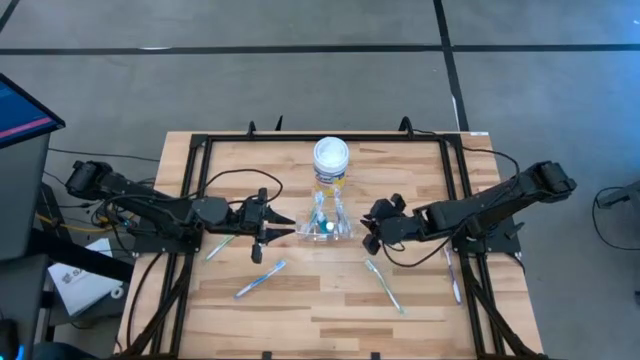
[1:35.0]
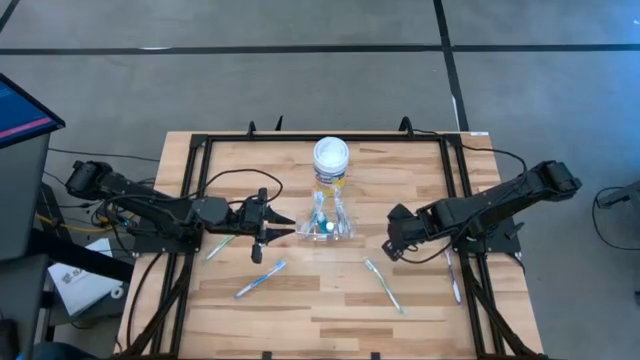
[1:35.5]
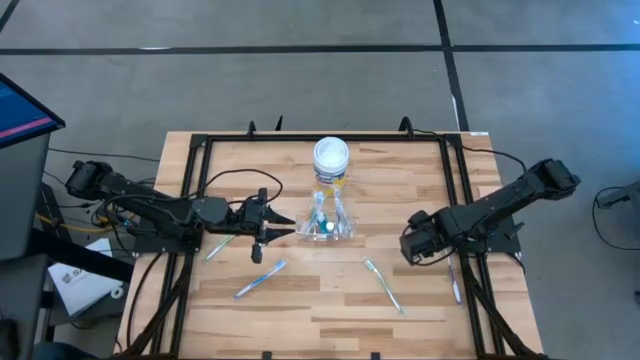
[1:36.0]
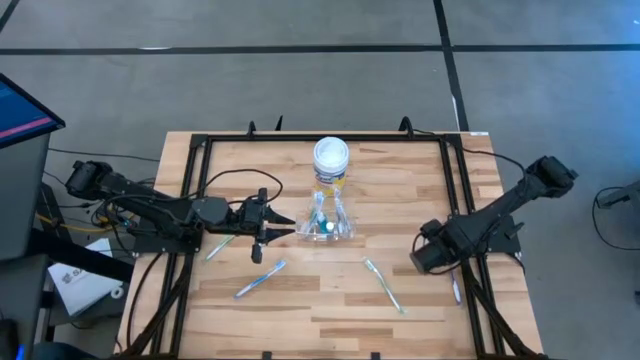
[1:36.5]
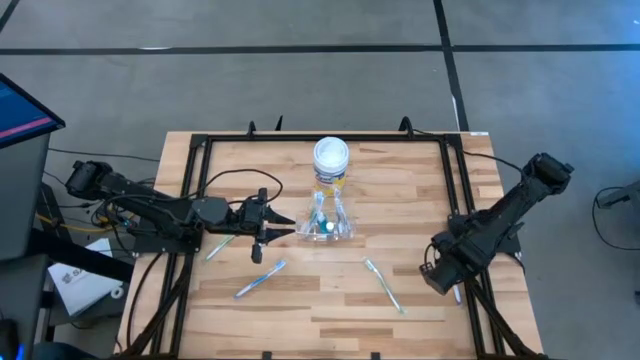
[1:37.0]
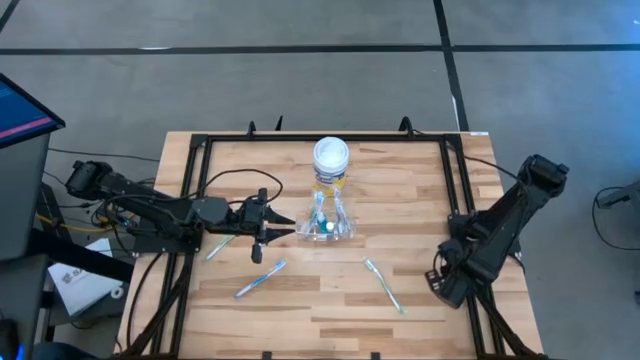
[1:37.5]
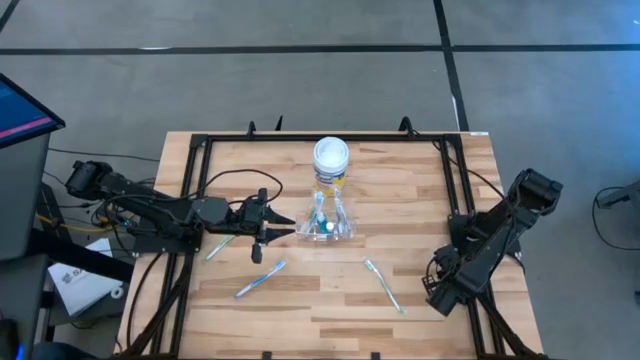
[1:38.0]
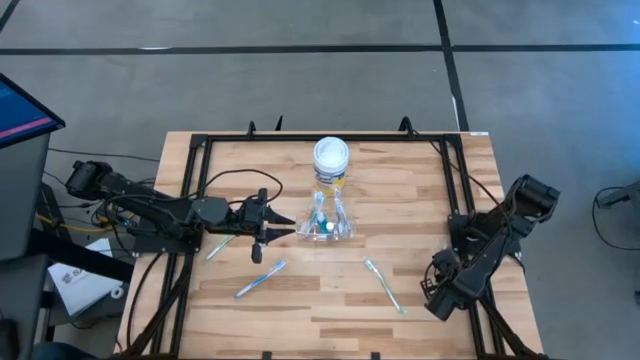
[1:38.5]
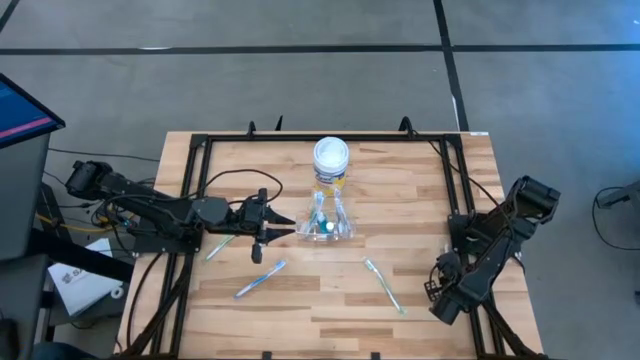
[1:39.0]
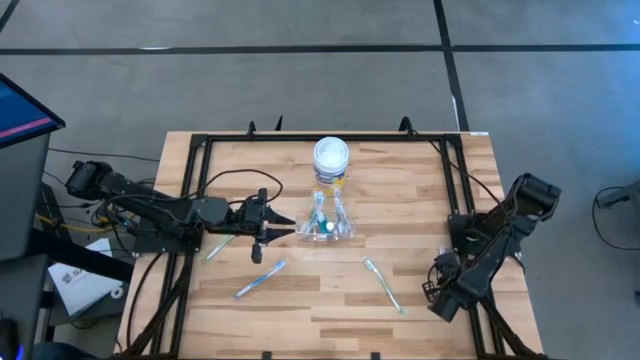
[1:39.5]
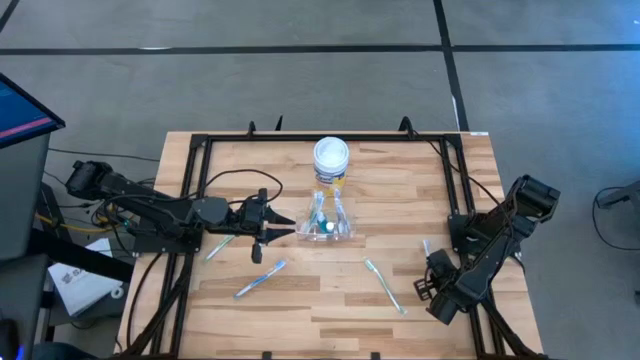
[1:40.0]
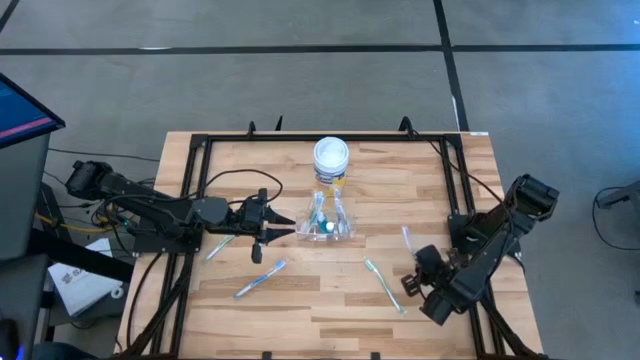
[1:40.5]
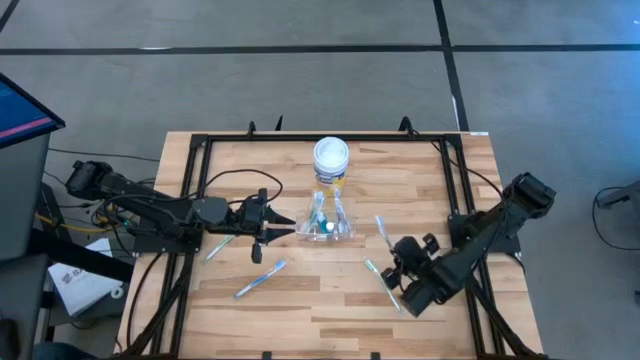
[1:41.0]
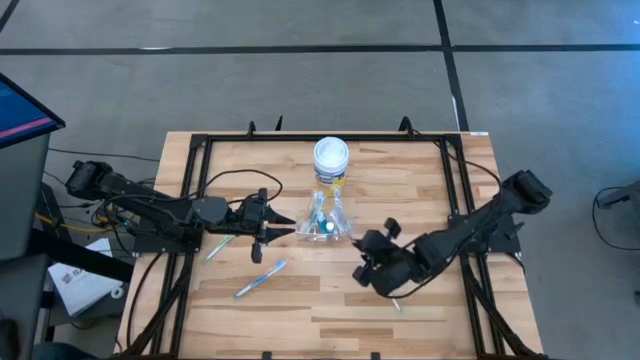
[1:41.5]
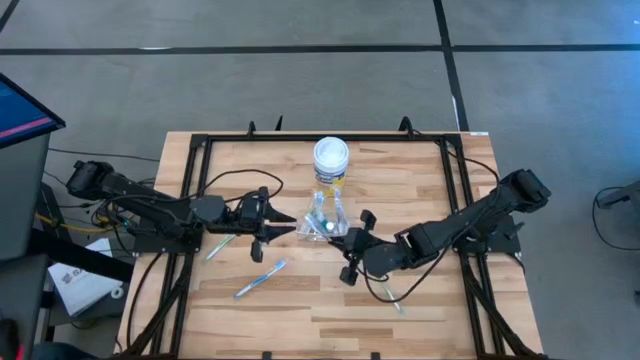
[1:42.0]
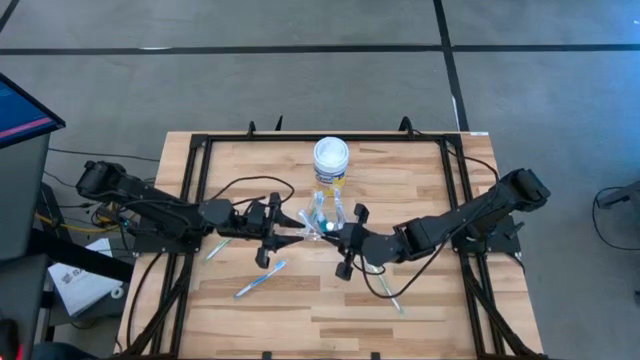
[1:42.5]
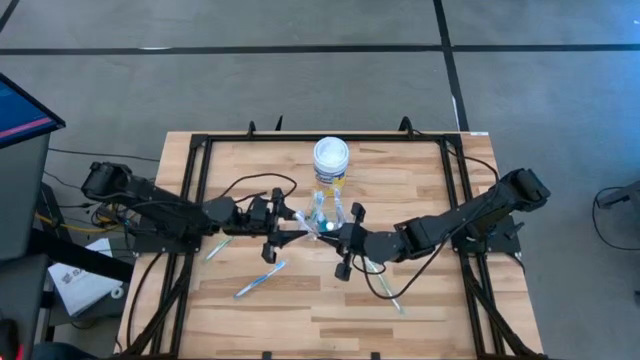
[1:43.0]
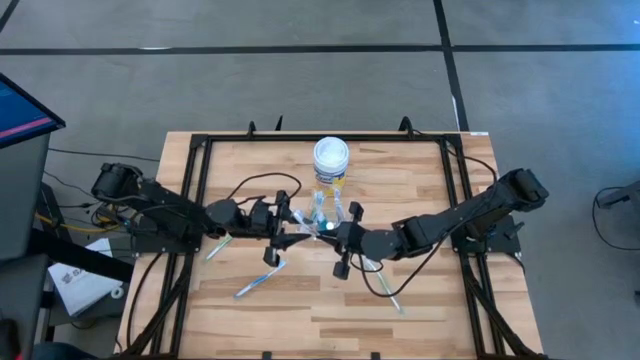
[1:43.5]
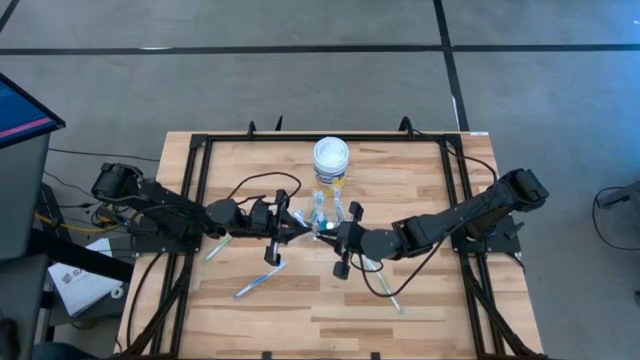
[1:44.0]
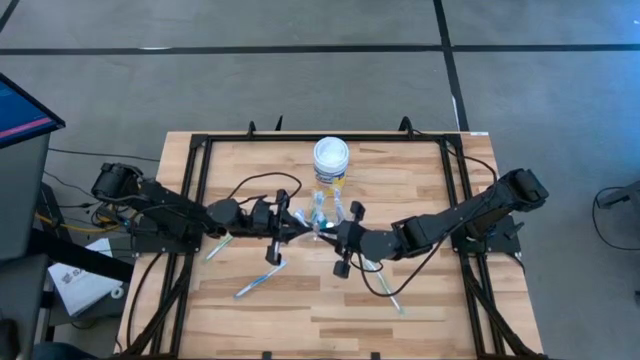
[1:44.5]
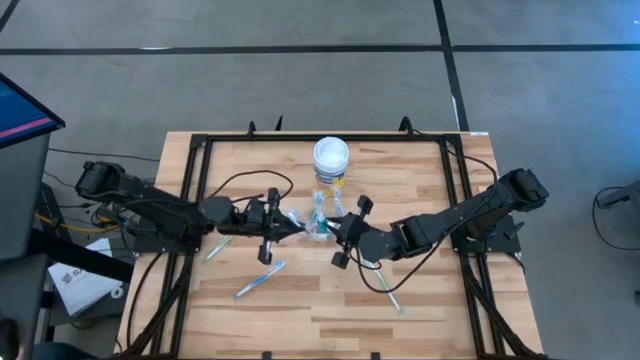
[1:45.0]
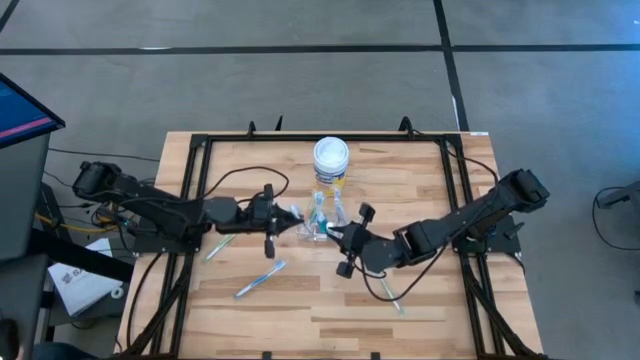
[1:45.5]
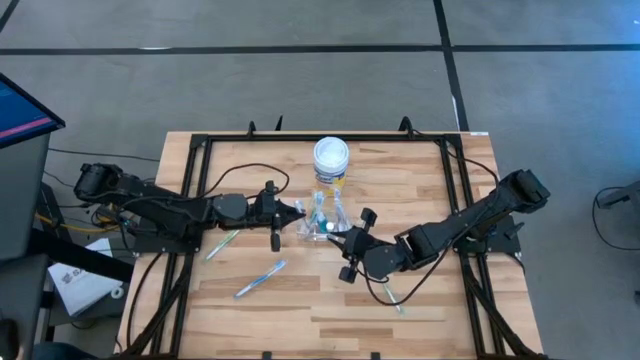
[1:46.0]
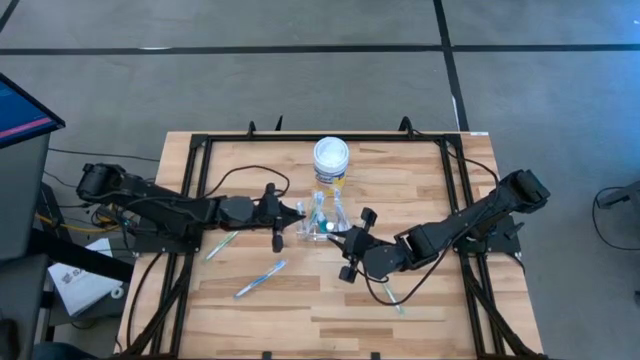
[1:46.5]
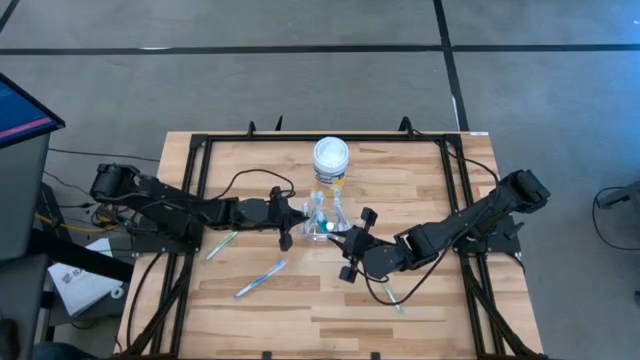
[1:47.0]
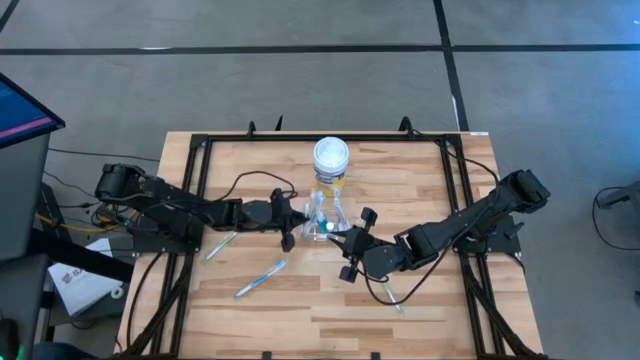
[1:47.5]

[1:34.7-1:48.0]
Task: Pick & Place toothbrushing station
Put the violet toothbrush into the transparent organizer

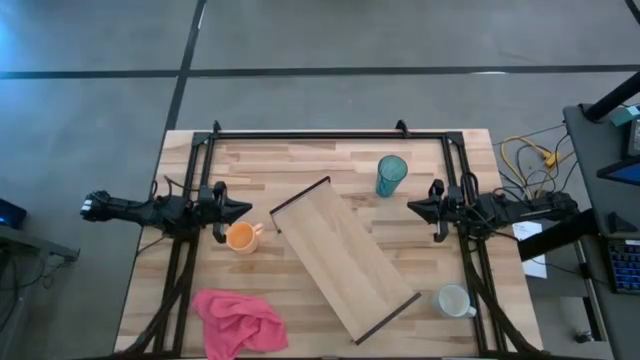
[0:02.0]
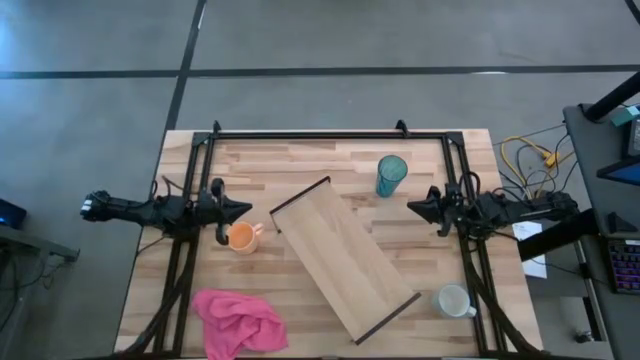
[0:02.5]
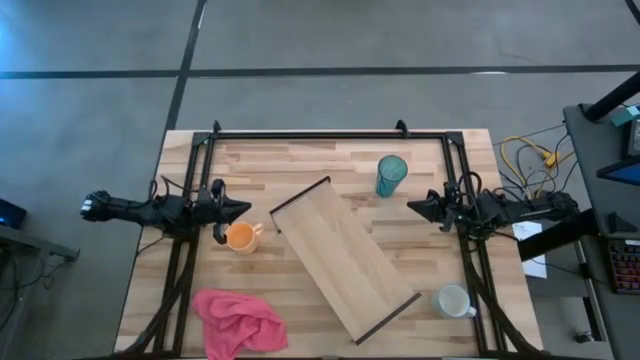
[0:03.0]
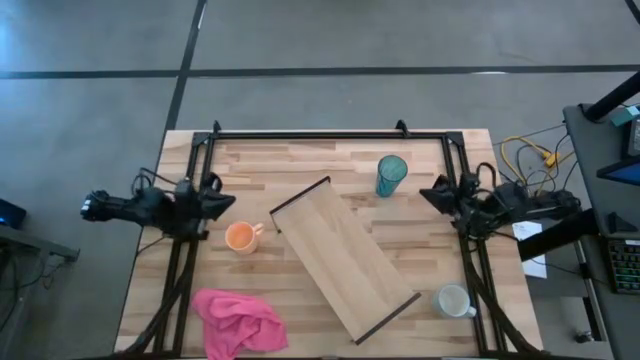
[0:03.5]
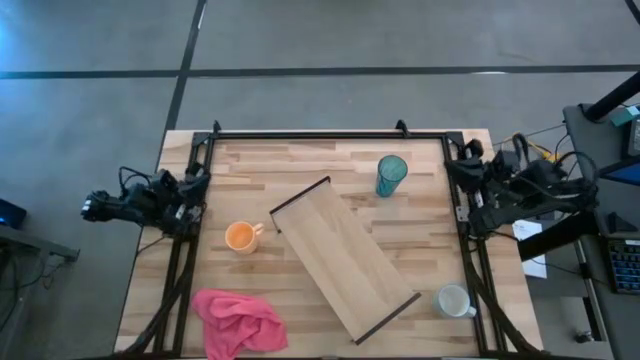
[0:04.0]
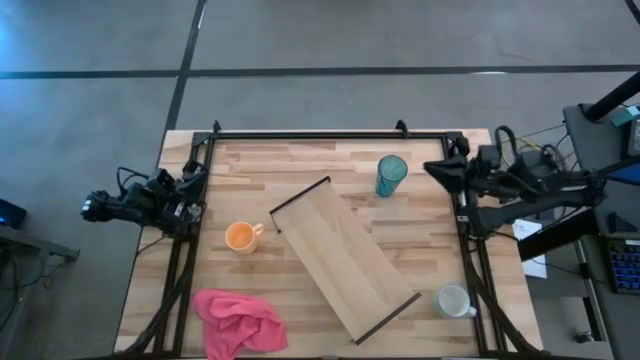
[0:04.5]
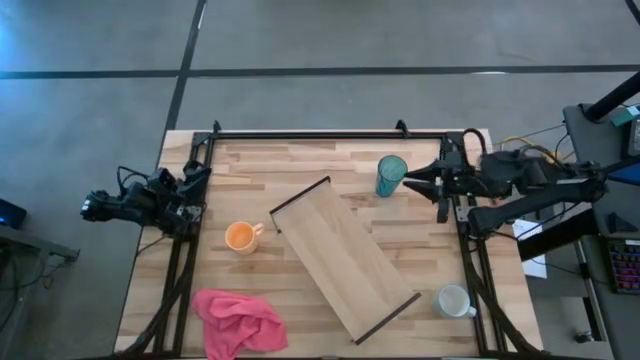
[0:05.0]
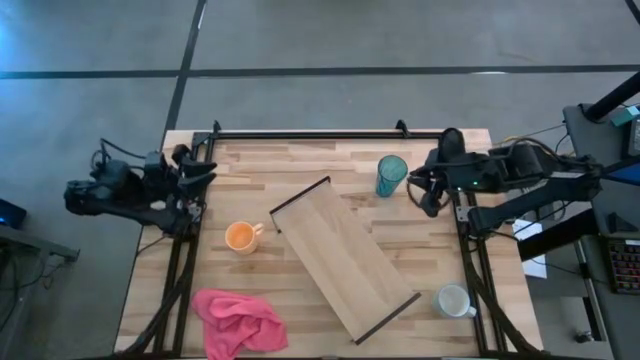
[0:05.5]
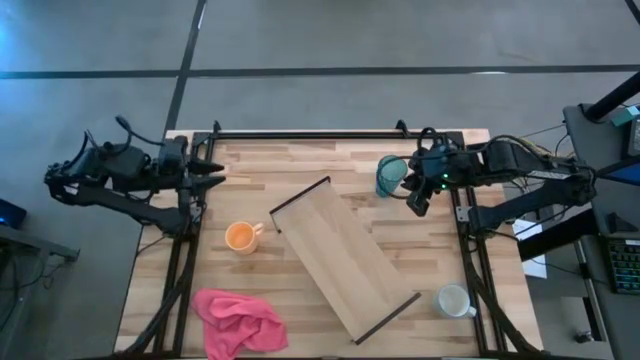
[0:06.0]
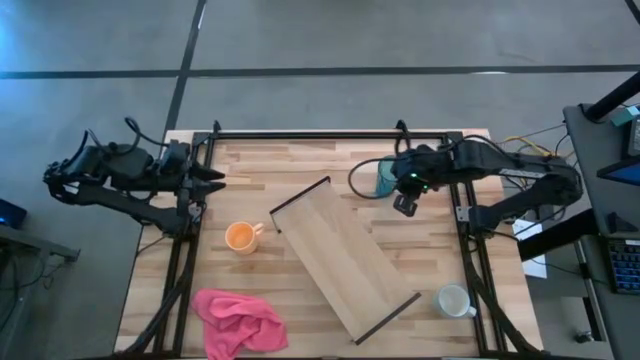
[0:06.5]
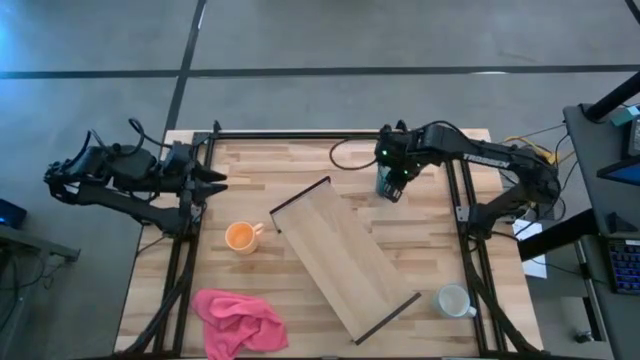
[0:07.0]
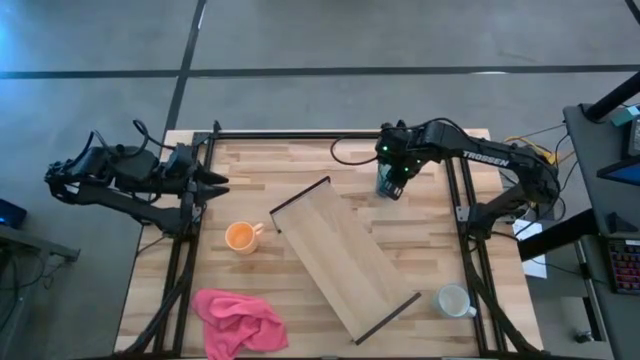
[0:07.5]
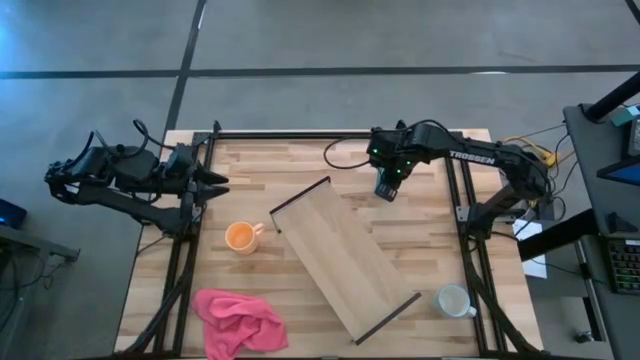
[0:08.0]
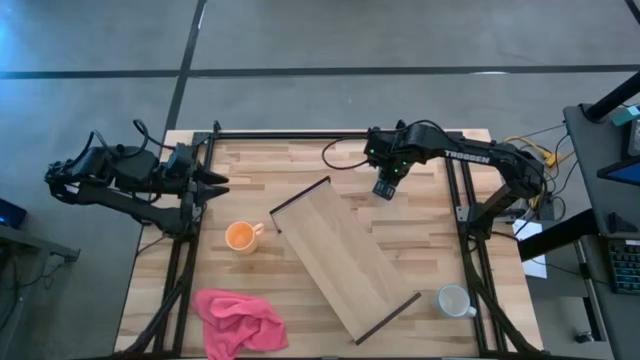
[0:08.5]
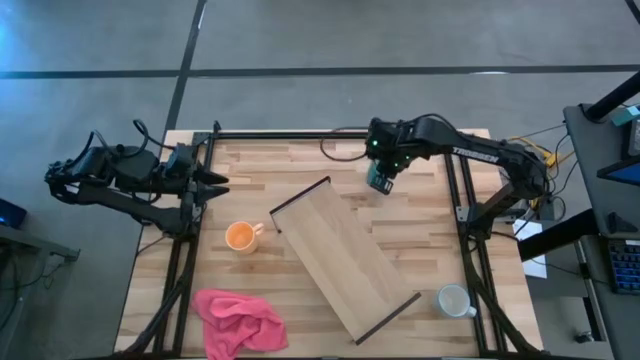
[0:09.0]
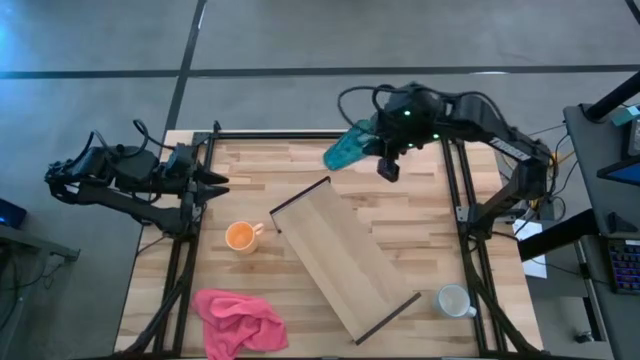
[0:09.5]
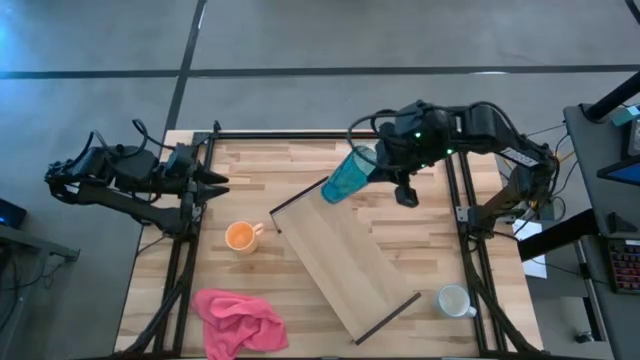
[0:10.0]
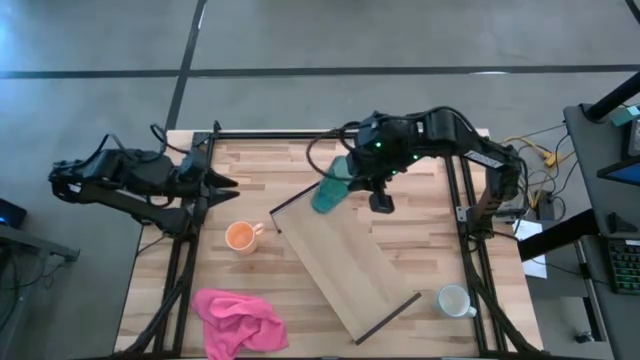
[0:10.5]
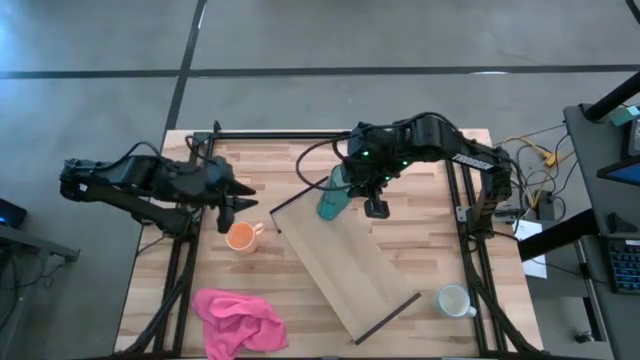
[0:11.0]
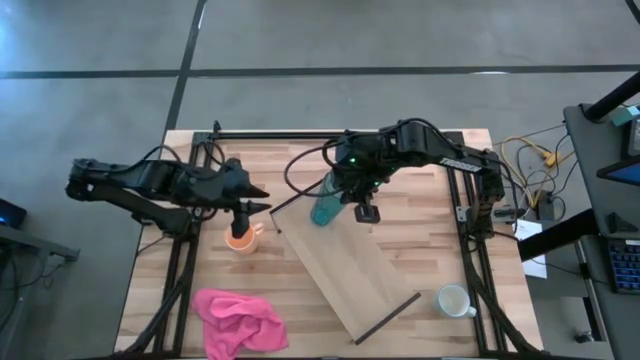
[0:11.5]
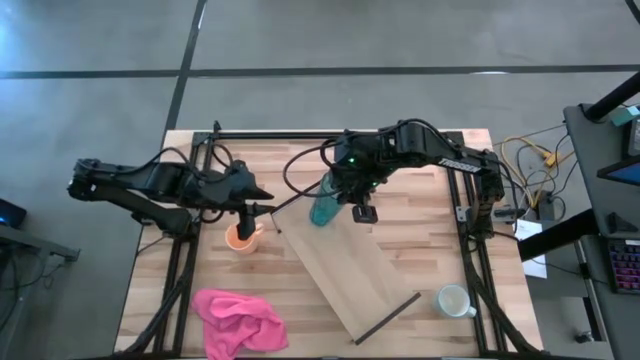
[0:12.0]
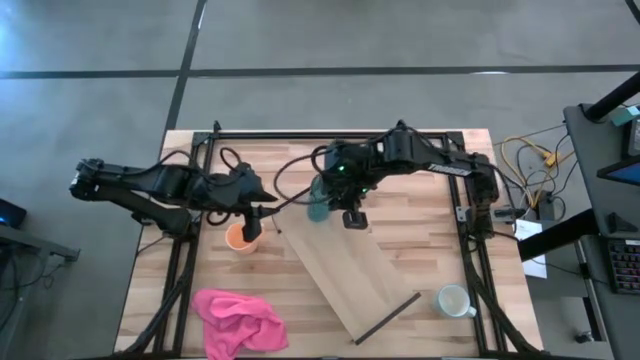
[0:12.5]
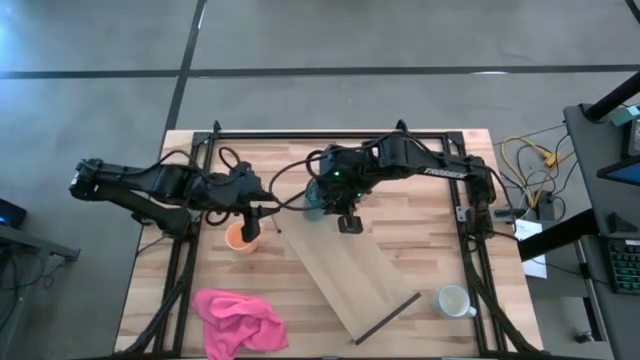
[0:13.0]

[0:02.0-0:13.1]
Task: Stack small to large cups/mugs on shelf
Put the blue glass on the shelf
